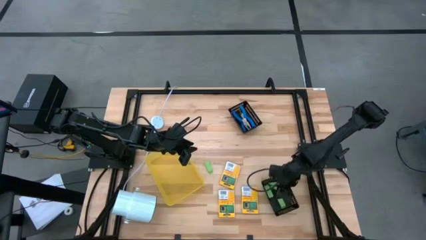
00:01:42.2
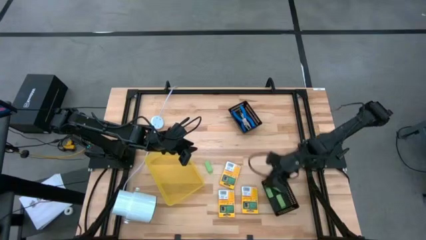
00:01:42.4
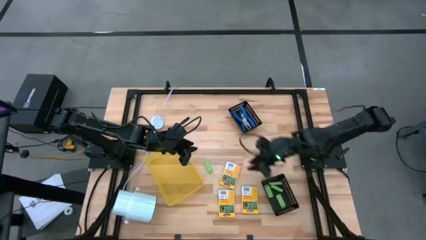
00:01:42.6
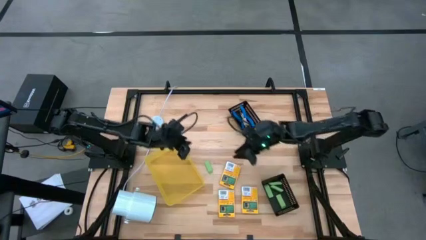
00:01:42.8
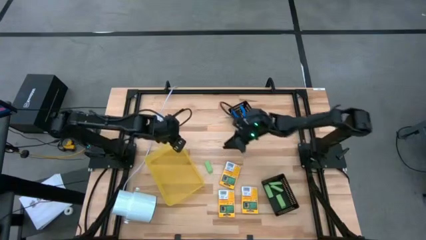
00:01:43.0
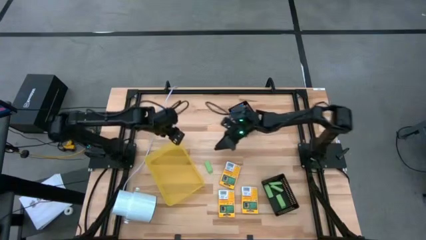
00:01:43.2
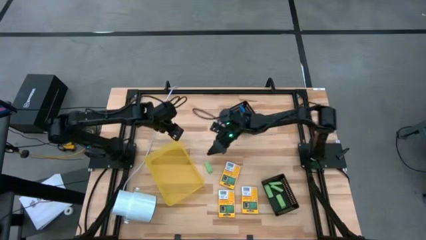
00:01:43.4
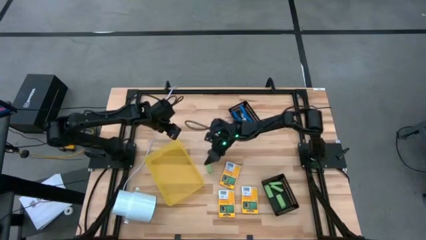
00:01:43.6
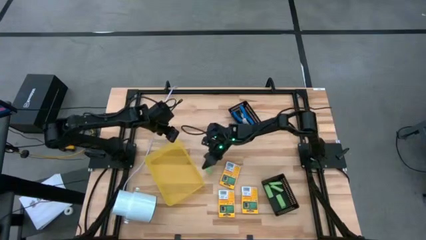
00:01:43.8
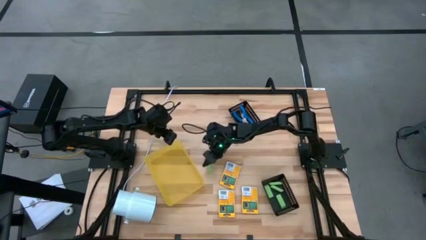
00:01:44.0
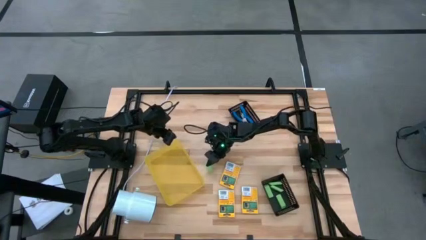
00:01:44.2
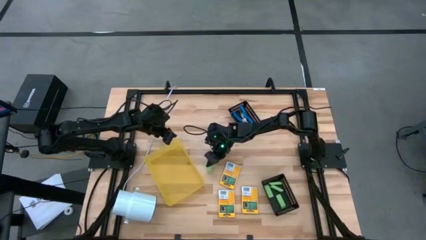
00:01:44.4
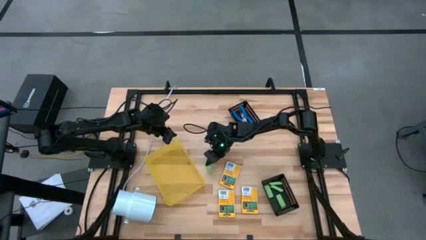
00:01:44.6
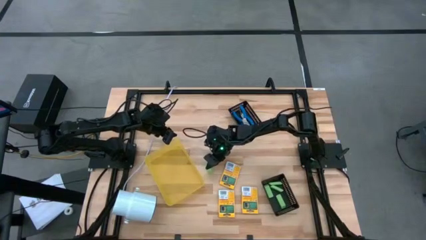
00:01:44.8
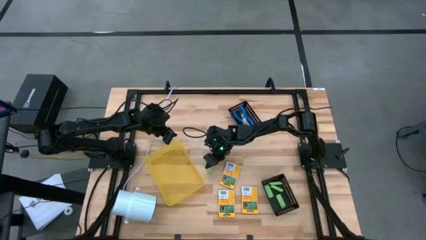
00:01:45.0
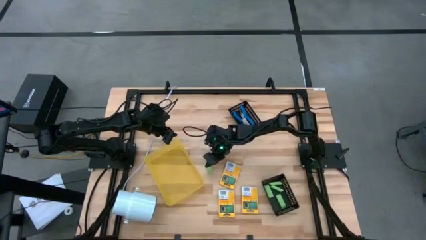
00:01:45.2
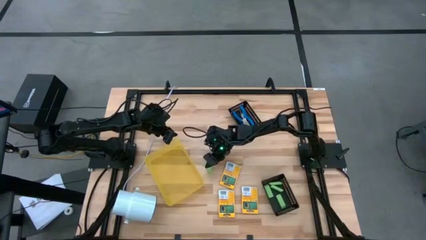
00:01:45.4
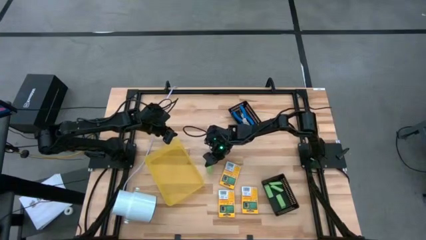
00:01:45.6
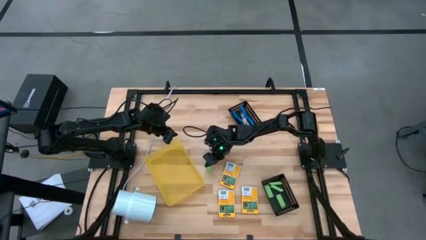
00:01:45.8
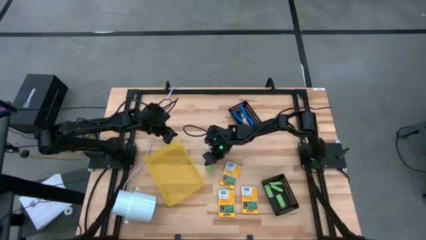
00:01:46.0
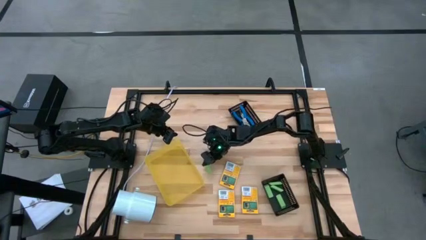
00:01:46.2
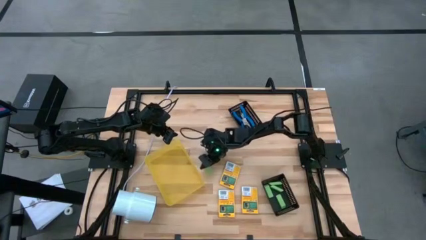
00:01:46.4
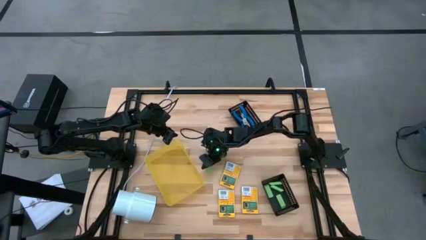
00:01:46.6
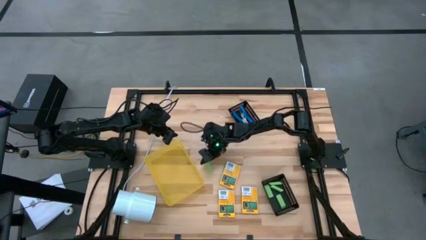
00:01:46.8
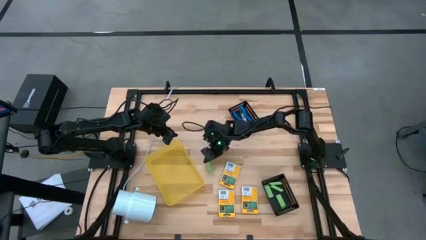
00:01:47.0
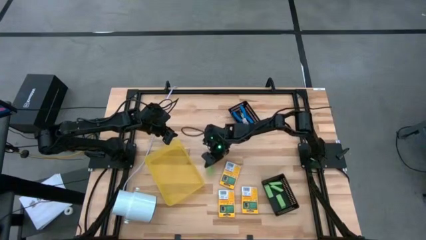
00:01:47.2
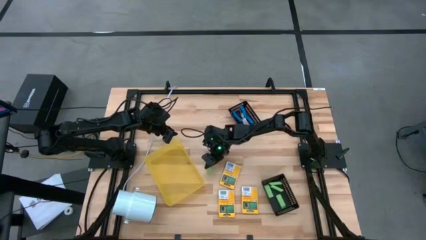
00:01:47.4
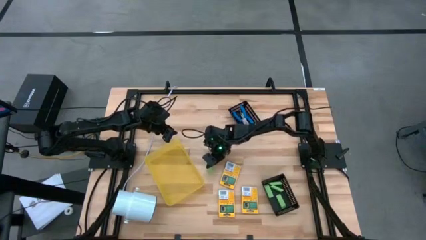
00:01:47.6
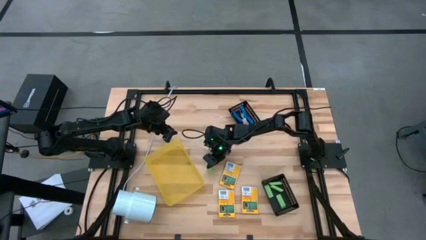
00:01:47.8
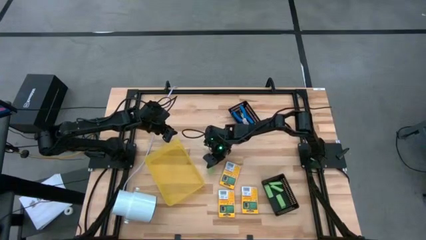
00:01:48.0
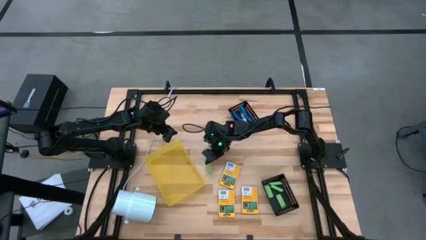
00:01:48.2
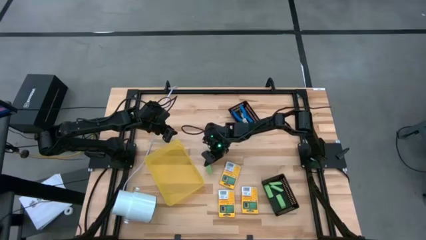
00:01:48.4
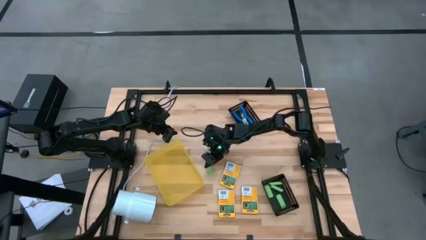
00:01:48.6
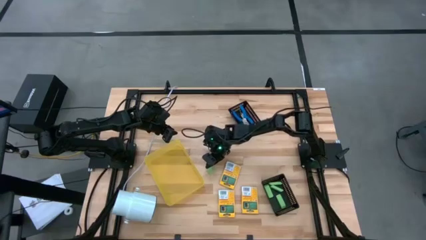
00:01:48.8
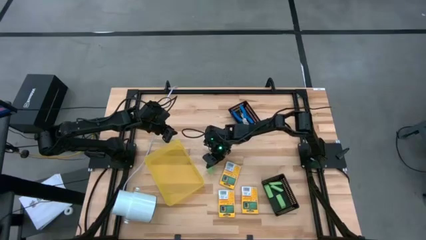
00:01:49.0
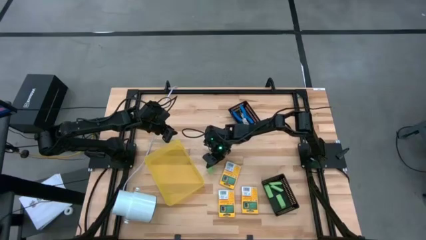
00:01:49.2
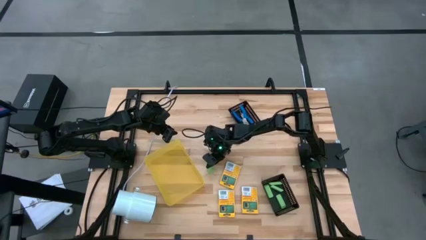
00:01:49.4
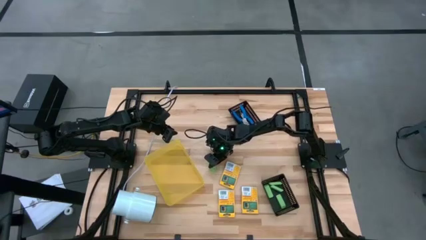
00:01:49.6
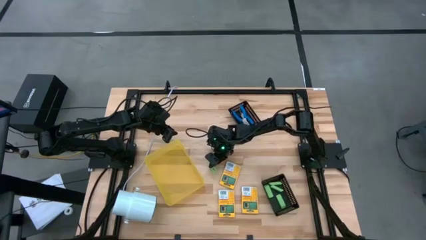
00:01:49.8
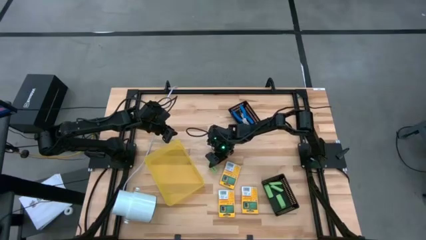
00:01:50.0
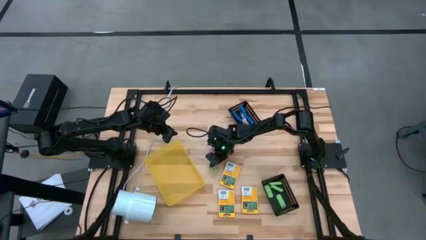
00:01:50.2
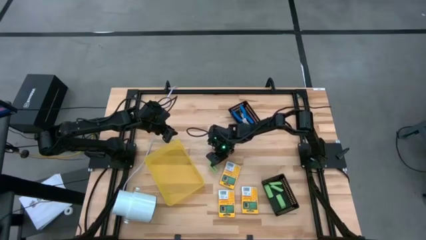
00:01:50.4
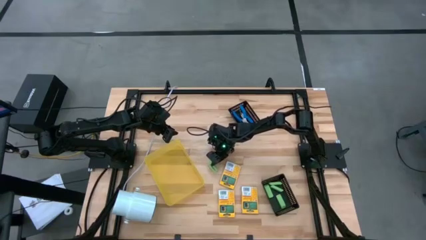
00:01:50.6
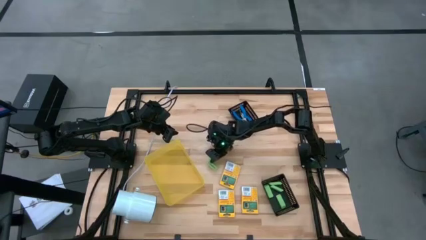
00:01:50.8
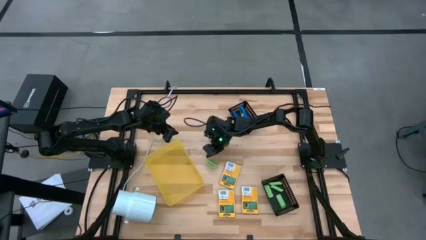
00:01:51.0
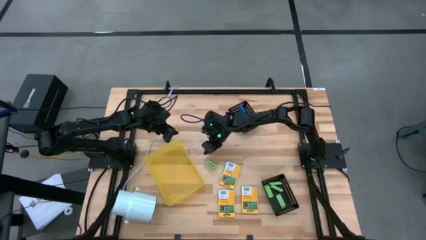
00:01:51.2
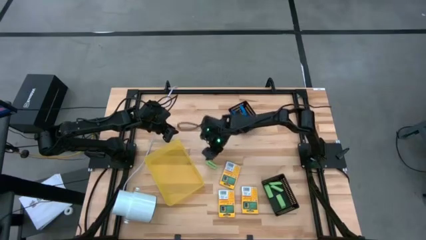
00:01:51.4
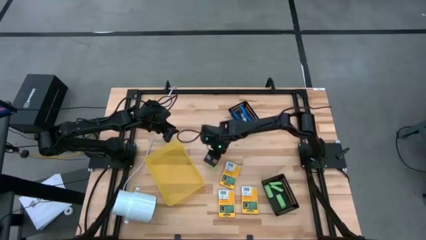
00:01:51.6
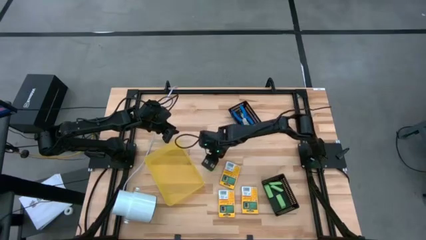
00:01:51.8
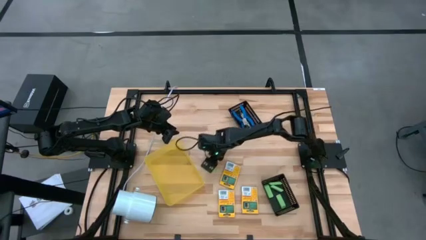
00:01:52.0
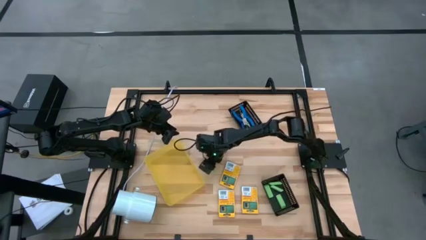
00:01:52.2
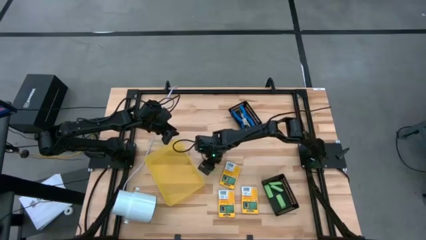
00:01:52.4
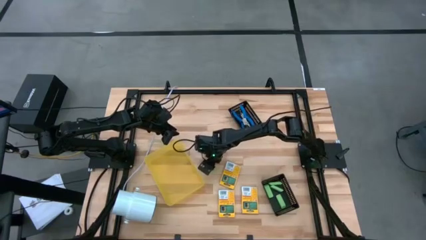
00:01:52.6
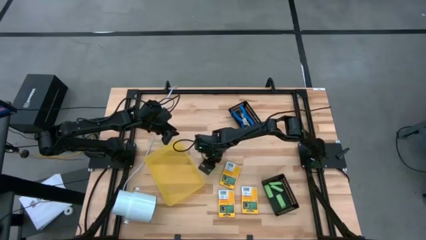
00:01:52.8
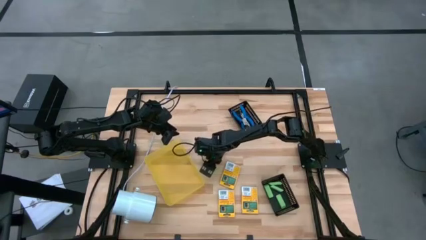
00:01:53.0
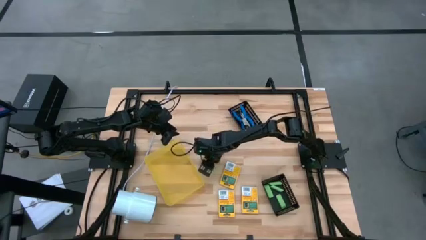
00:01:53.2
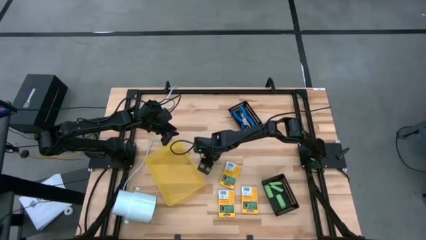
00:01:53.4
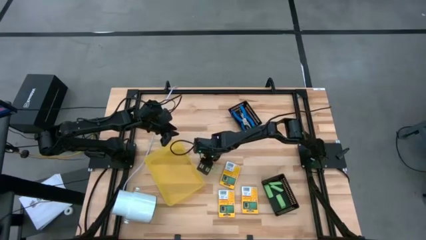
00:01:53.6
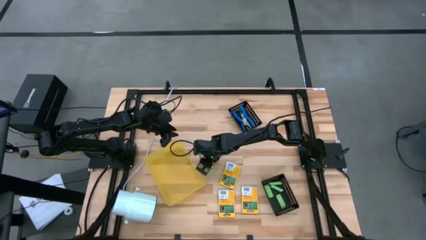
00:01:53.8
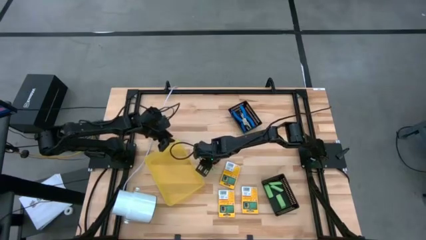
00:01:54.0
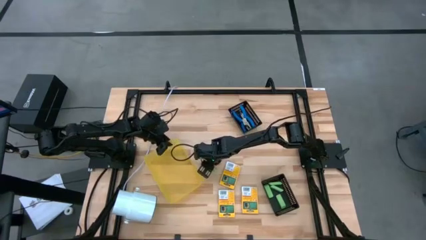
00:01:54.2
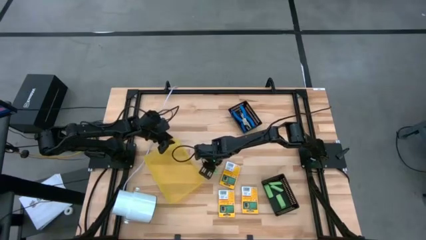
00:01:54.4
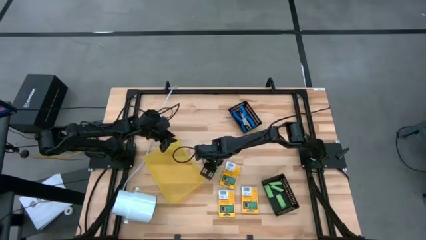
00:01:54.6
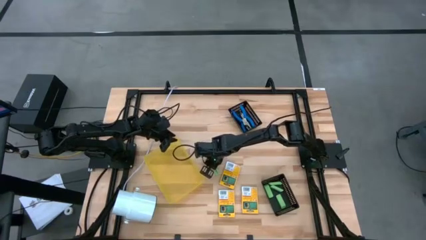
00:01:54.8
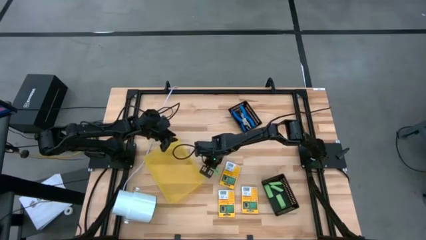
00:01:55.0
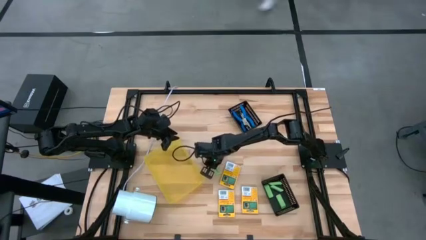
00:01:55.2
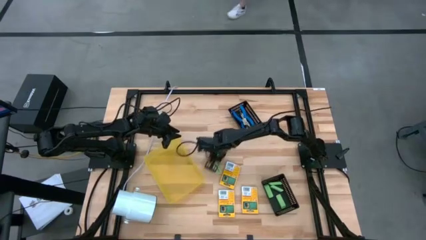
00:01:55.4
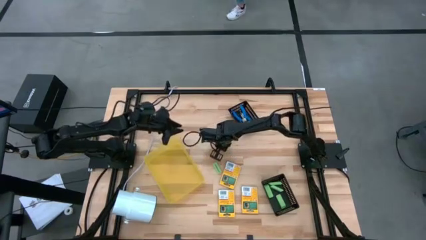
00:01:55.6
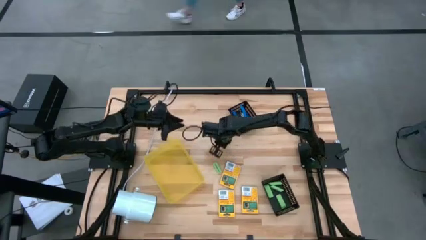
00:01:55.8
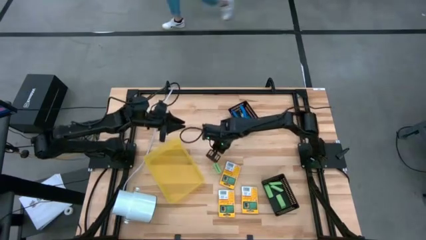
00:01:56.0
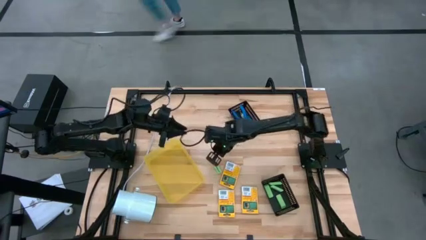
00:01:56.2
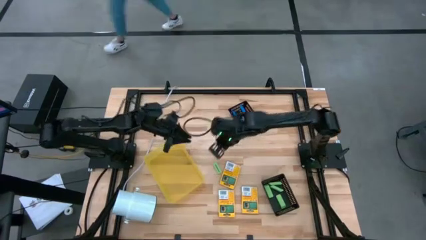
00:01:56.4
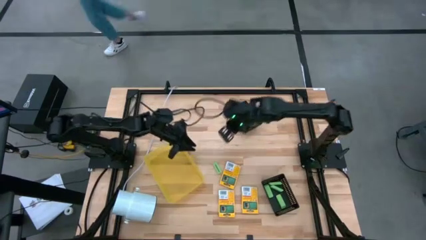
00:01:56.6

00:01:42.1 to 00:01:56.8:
Task: Pick & Place School Supplies
Put the green eraser into the bottom black bin

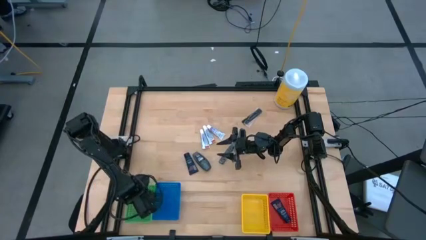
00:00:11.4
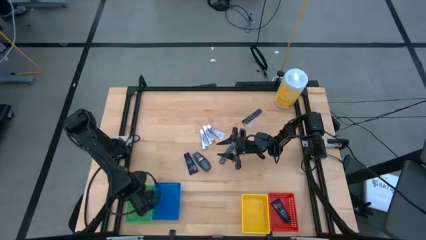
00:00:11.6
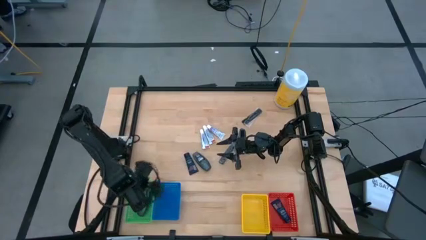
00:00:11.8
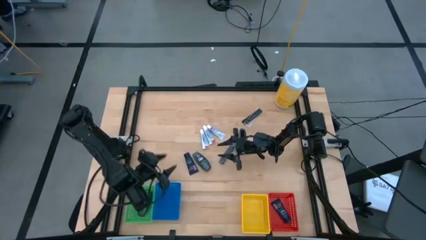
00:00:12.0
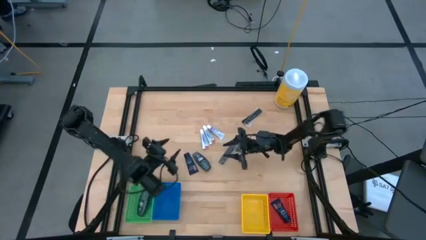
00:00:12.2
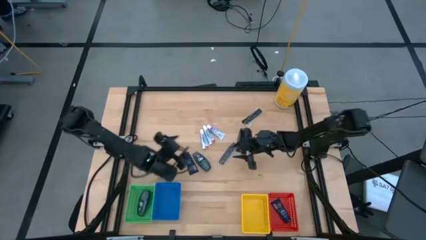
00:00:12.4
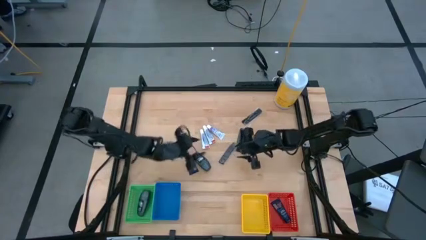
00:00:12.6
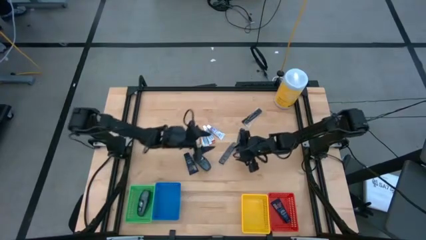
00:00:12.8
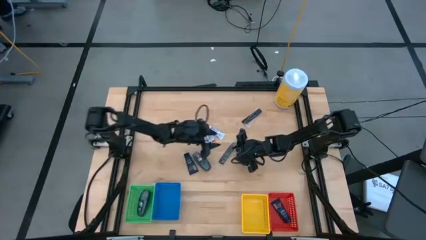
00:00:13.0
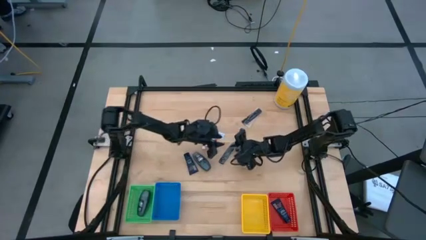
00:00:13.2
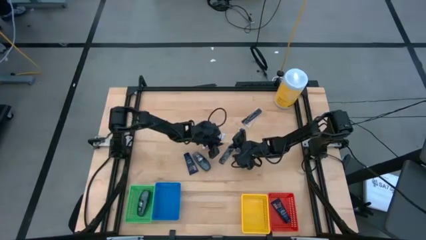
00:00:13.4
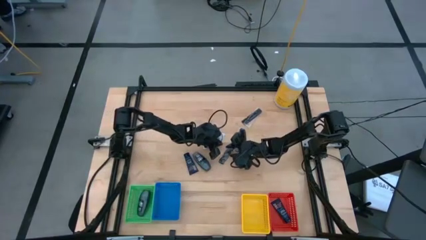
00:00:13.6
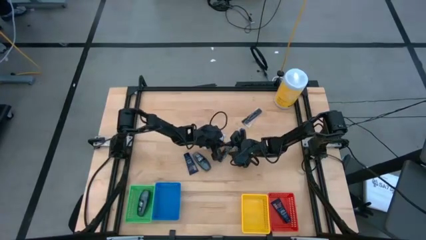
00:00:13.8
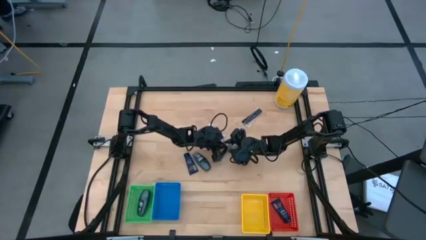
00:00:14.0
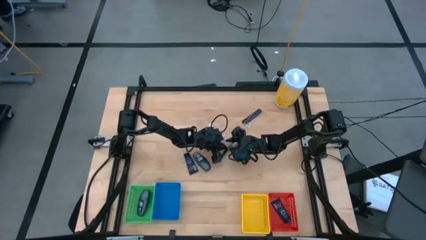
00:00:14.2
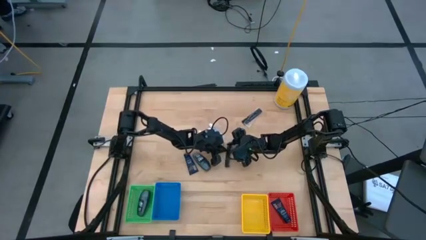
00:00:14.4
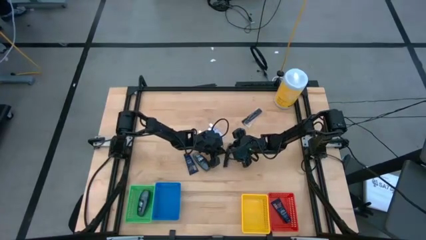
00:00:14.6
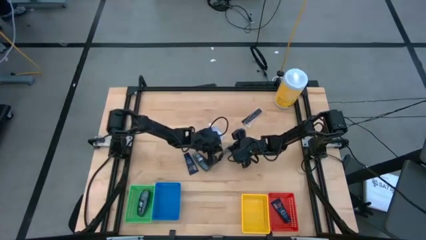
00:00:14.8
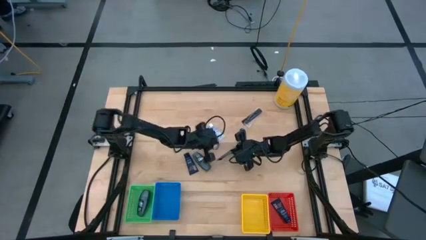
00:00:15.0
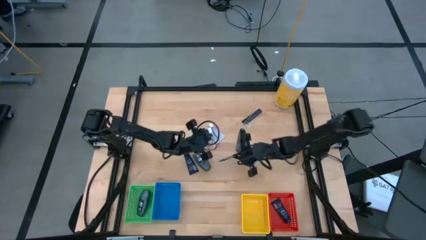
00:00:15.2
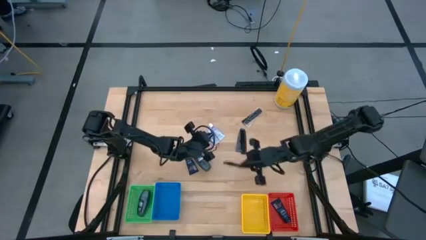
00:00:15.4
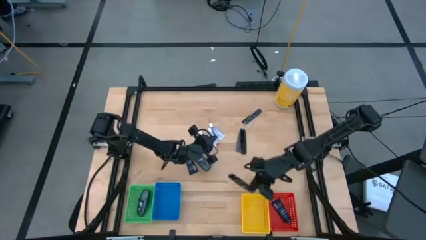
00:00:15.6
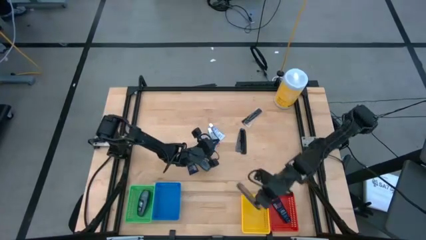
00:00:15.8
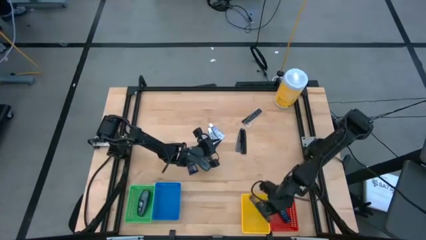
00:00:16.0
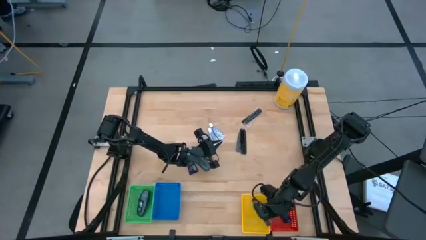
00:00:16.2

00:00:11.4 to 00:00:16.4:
Task: Pick & Place Travel size toiletries
Put the black comb into the yellow bin
